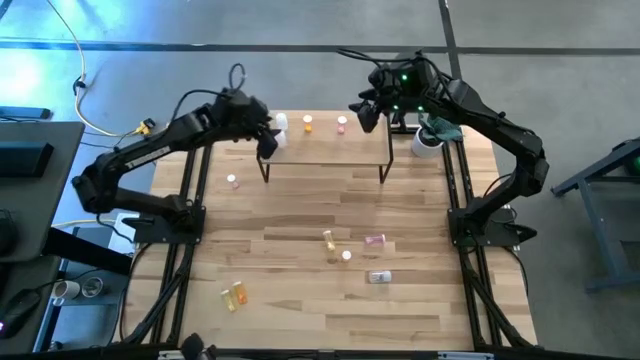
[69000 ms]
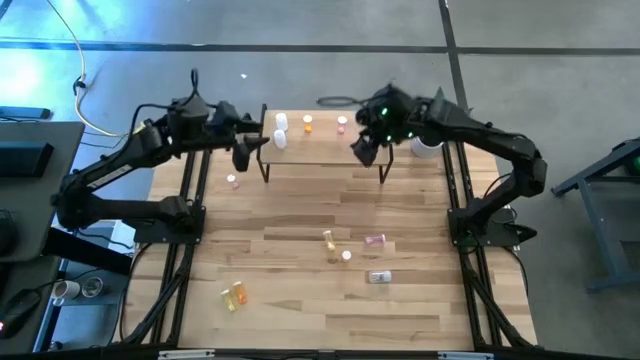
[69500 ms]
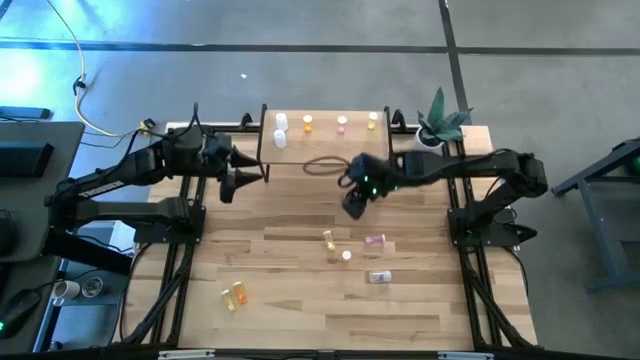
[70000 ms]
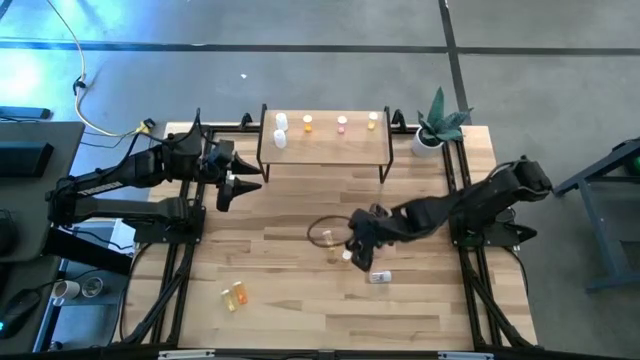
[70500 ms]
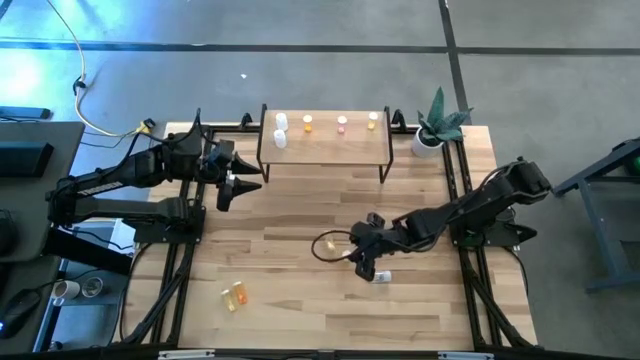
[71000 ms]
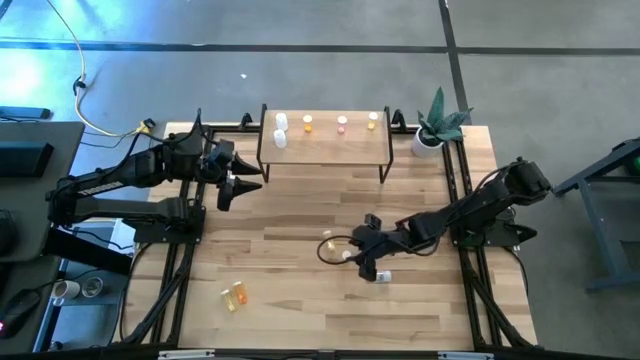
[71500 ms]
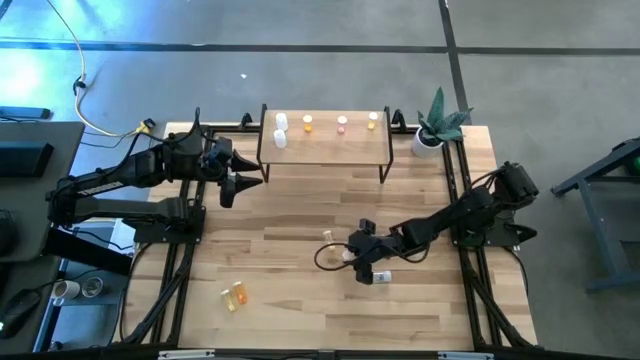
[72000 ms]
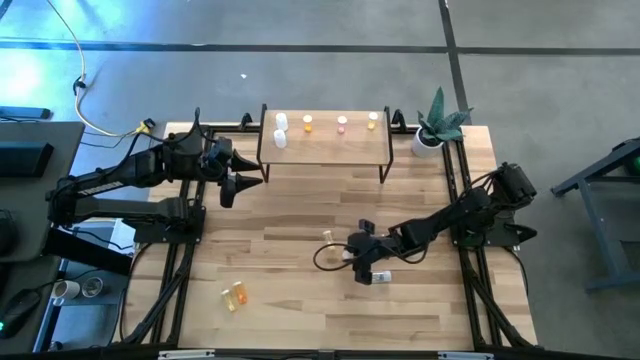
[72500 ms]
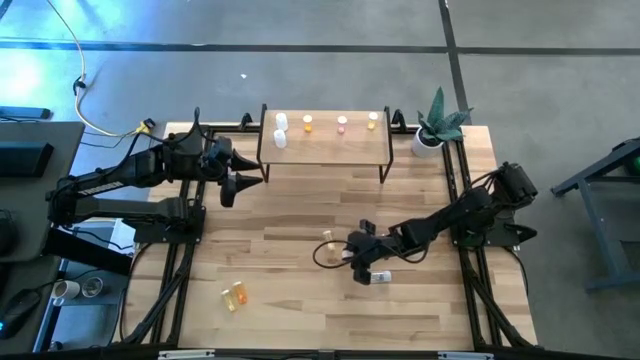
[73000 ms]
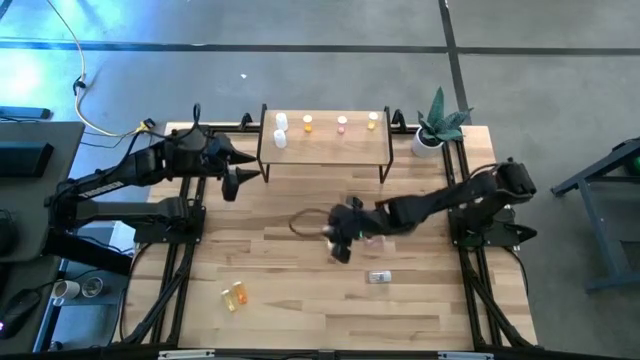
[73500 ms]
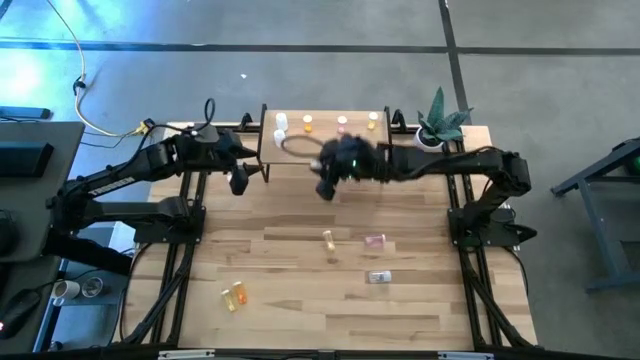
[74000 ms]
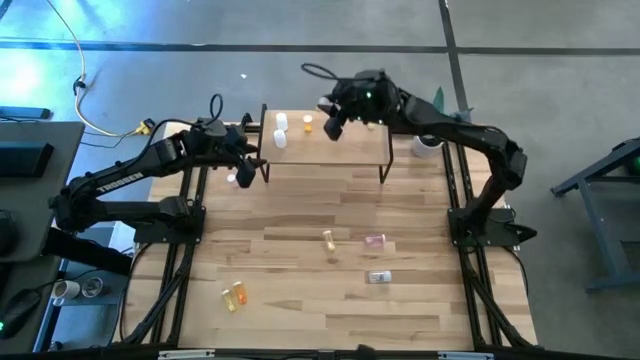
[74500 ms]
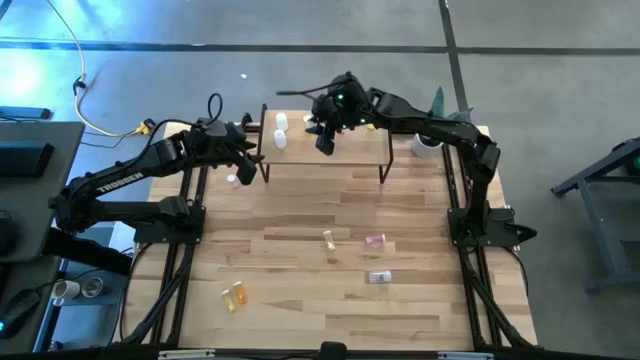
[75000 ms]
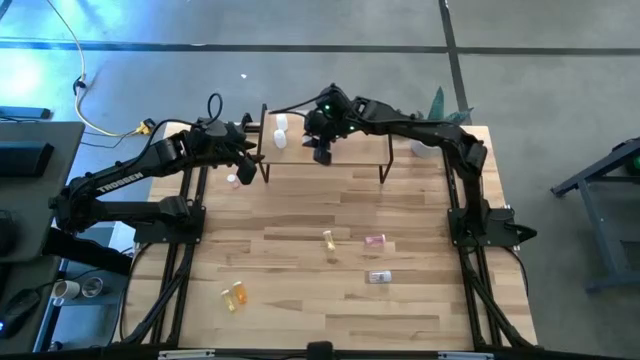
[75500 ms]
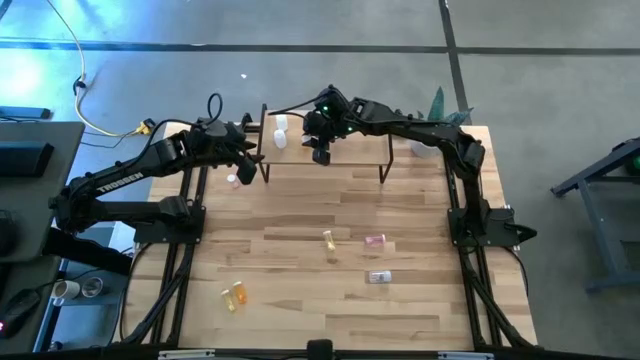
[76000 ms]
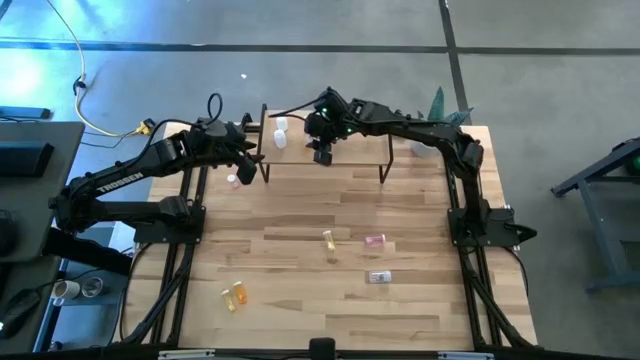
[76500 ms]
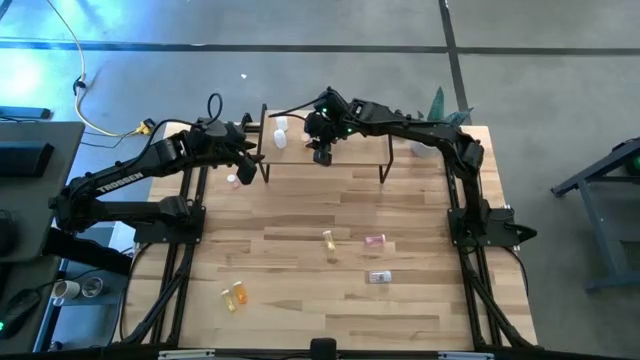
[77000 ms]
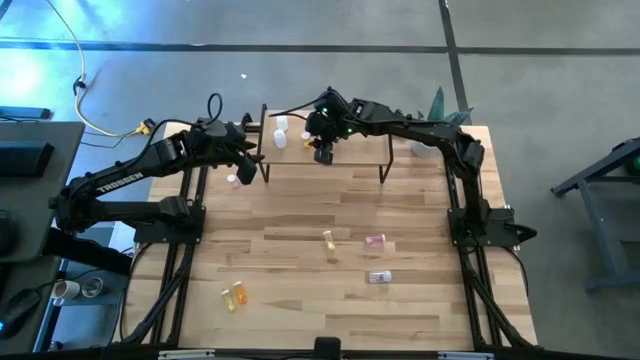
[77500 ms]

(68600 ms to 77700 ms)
Task: Pick and place medicine bottles onto shelf by color
Put the top orange pill bottle aligned with the other orange pill bottle on the shelf

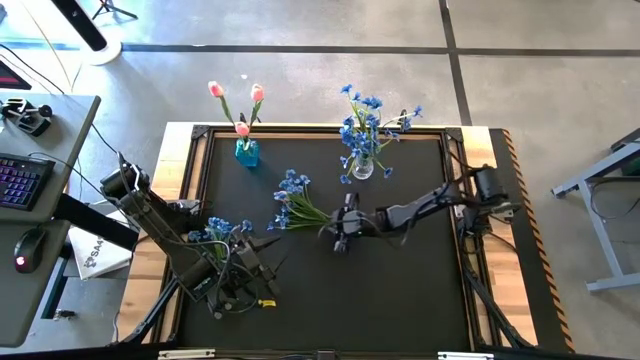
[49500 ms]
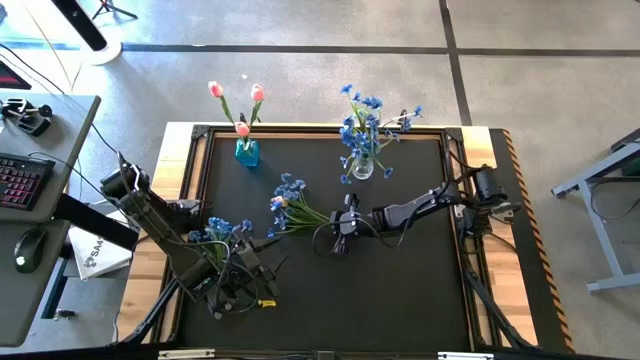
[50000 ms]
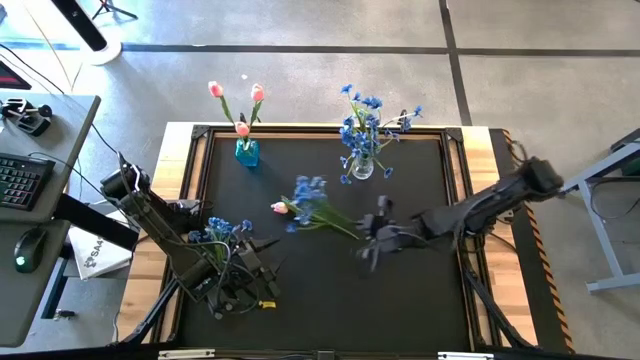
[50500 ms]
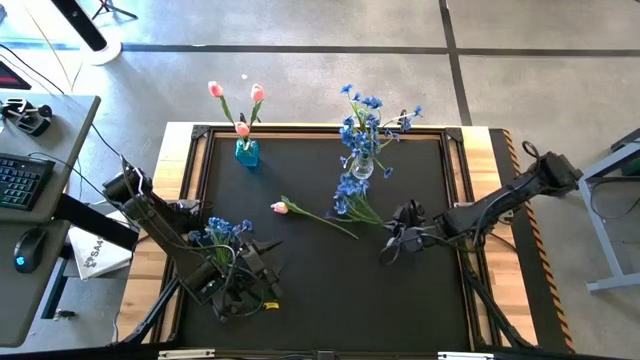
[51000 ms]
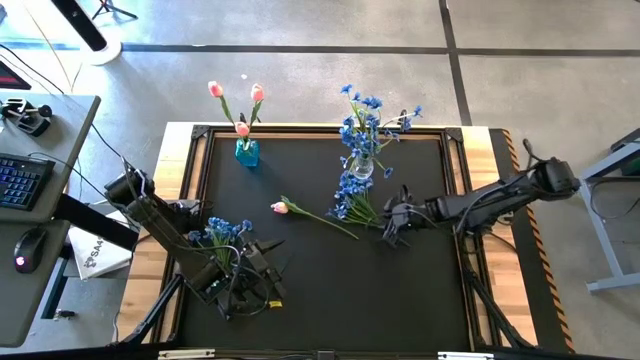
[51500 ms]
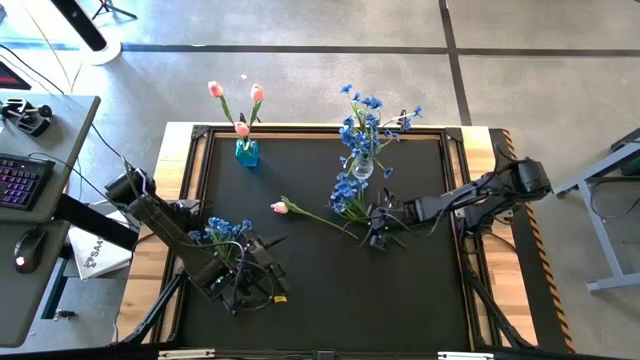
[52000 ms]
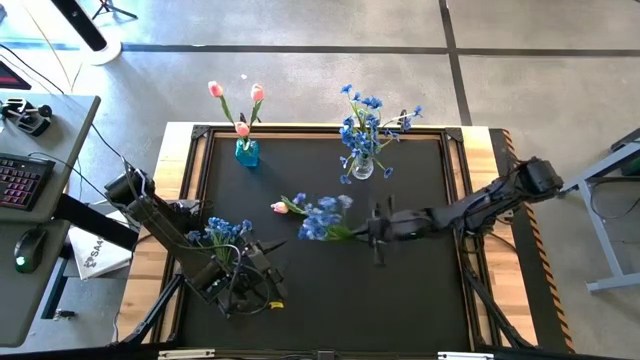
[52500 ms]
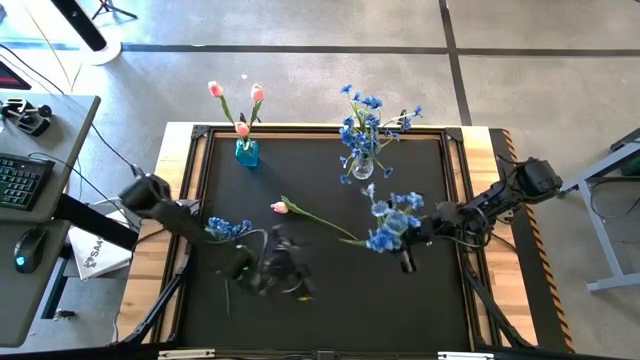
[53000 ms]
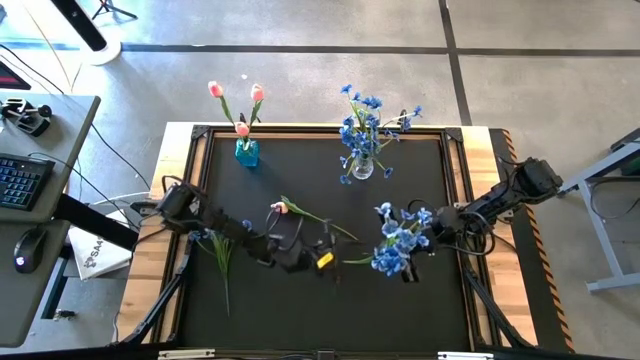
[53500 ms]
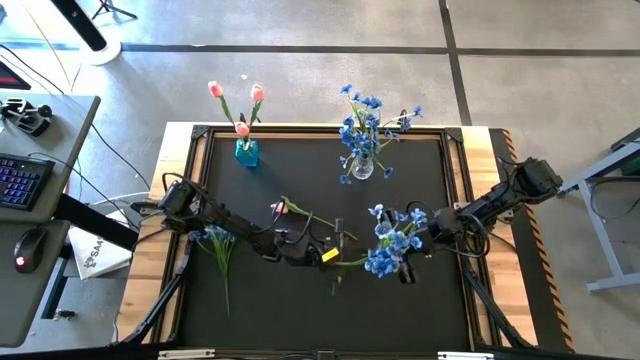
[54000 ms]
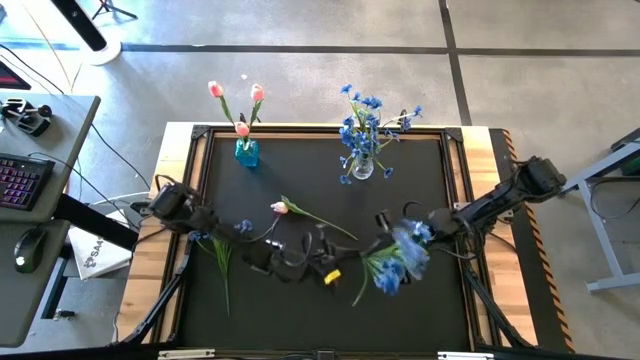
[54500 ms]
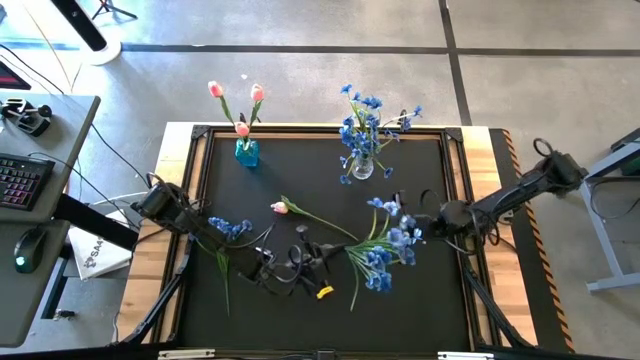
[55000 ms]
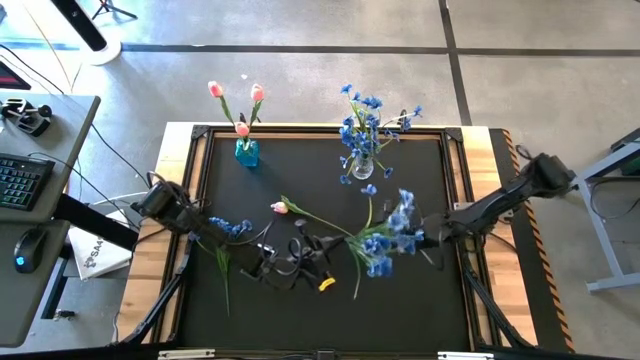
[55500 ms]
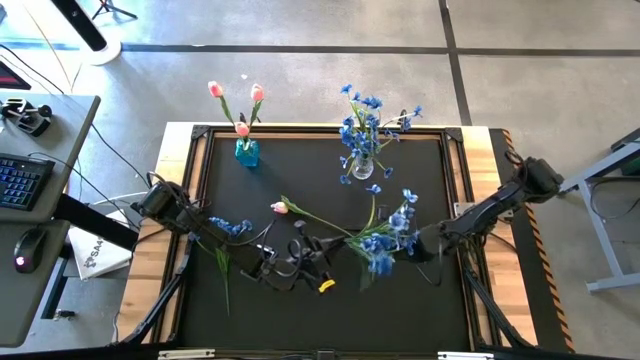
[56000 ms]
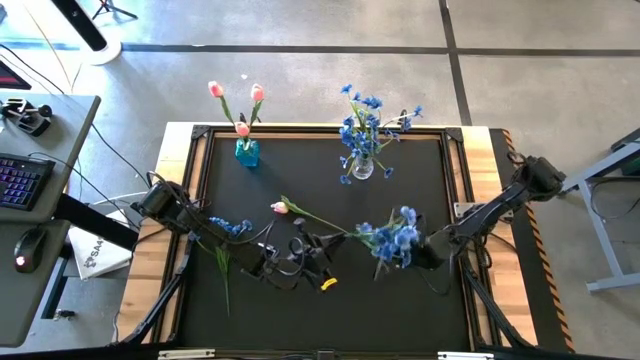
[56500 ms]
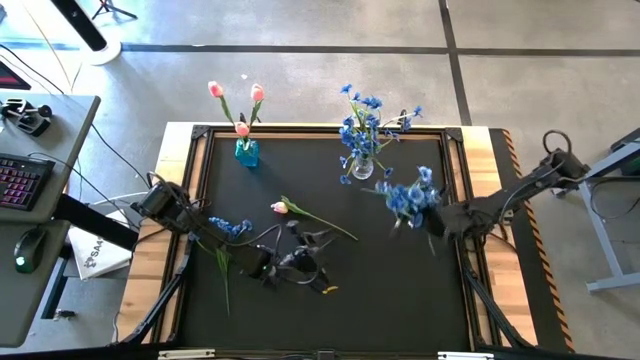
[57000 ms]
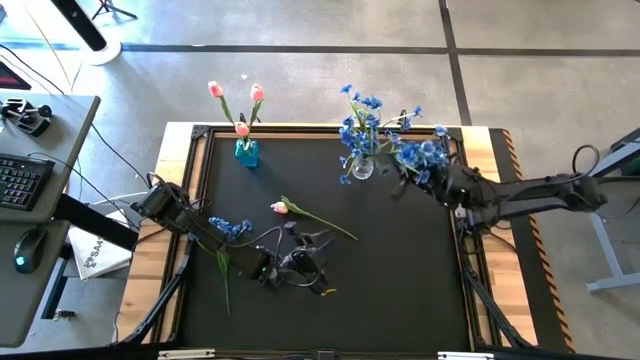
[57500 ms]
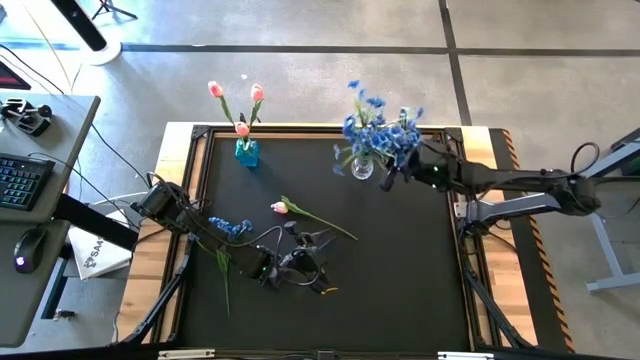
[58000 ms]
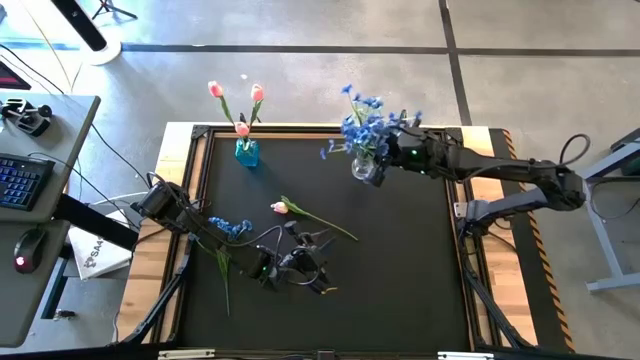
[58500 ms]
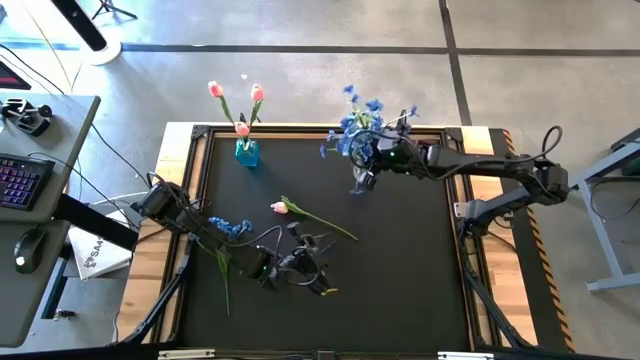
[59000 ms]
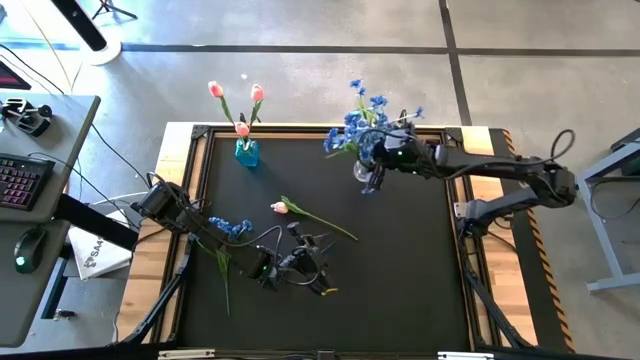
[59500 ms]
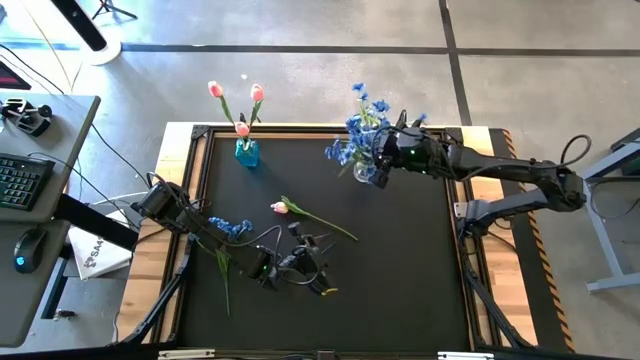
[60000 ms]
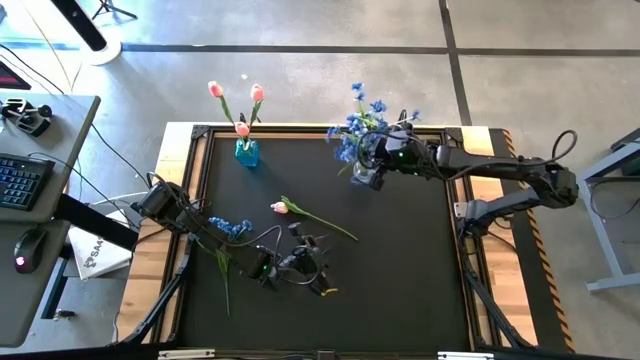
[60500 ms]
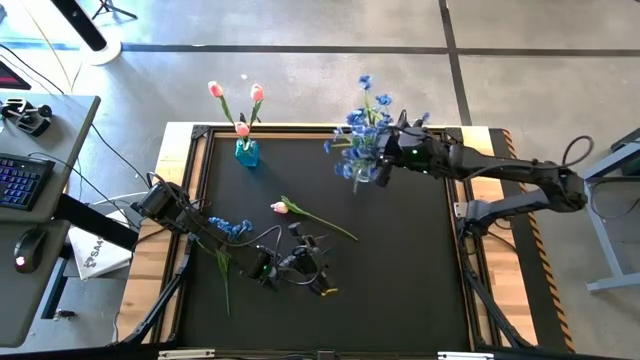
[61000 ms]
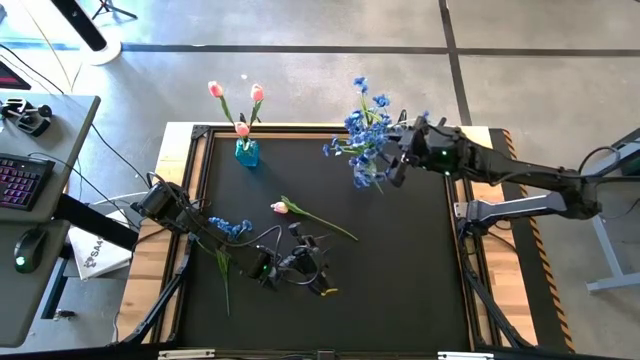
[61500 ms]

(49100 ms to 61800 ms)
Task: Sort flowers into vase by color
Put the blue flowers into the transparent flower vase
